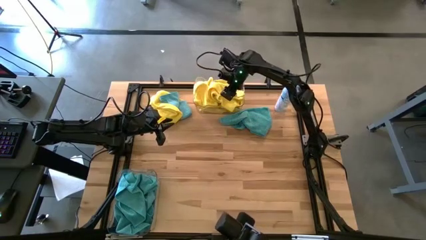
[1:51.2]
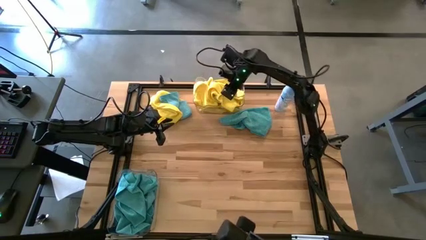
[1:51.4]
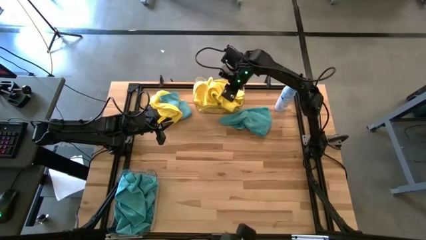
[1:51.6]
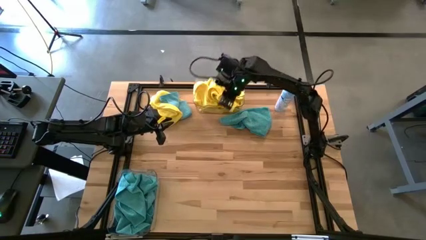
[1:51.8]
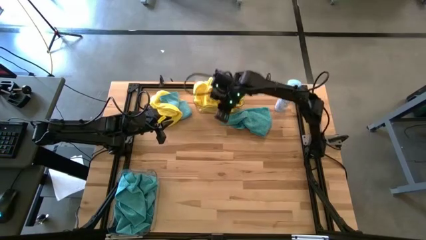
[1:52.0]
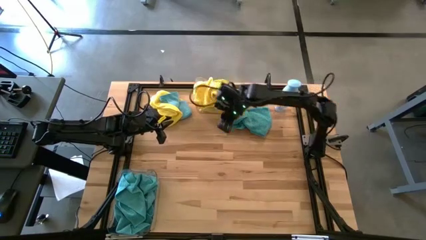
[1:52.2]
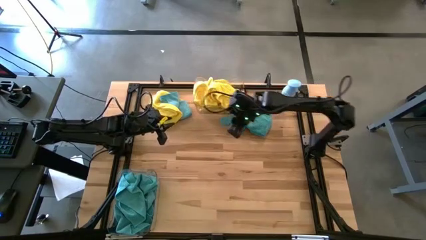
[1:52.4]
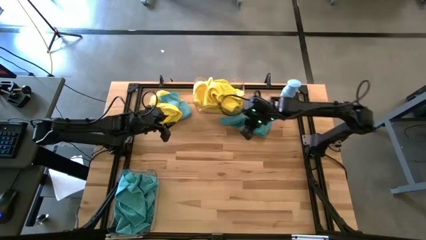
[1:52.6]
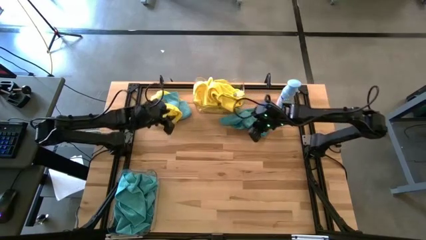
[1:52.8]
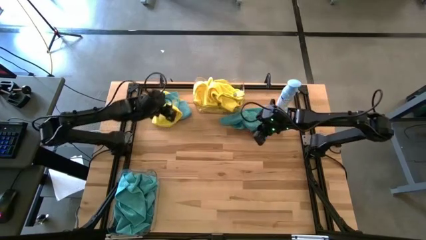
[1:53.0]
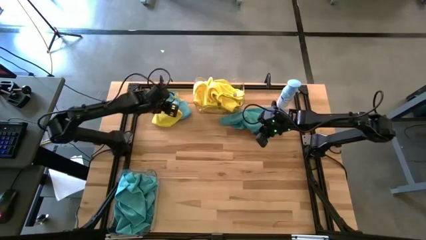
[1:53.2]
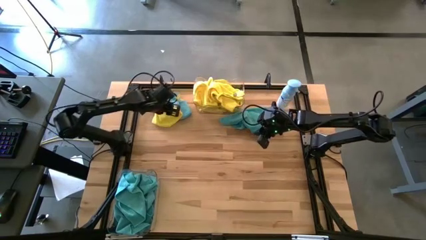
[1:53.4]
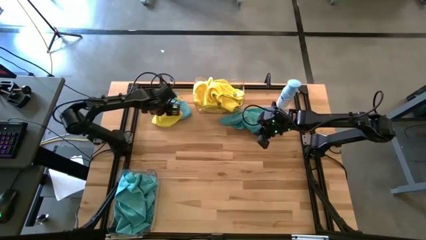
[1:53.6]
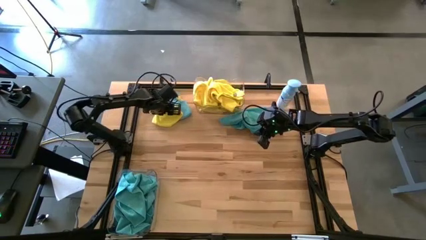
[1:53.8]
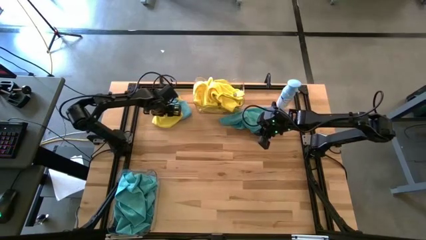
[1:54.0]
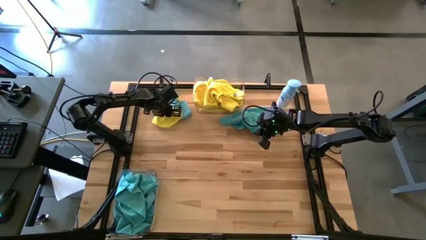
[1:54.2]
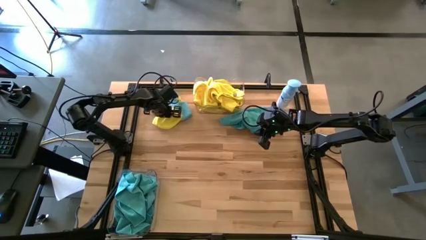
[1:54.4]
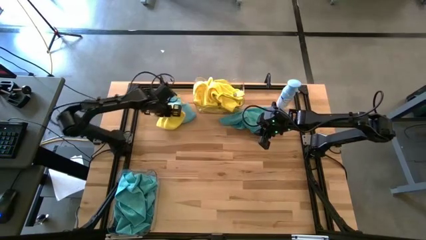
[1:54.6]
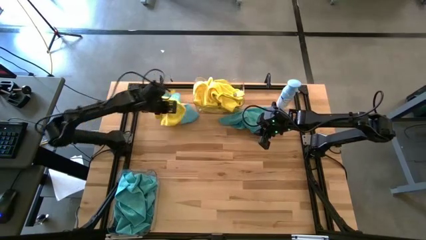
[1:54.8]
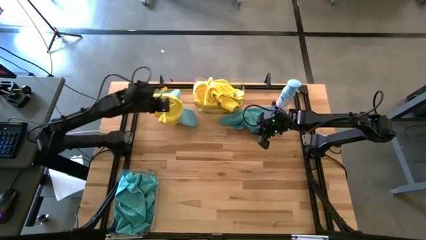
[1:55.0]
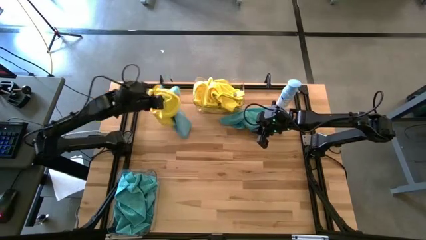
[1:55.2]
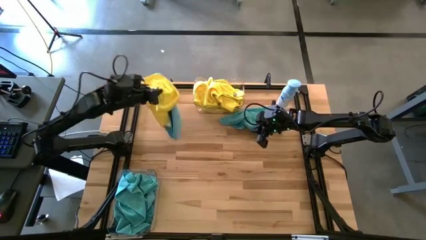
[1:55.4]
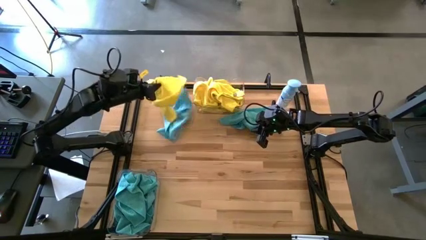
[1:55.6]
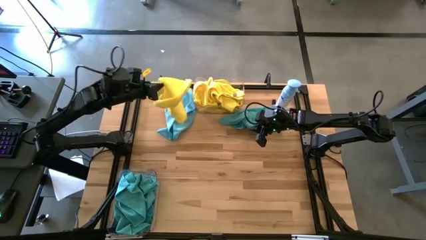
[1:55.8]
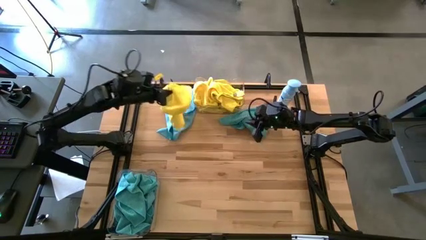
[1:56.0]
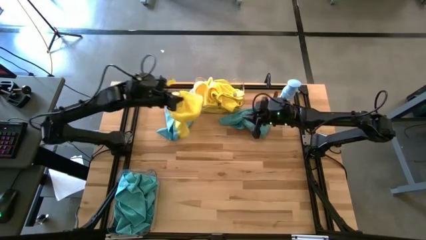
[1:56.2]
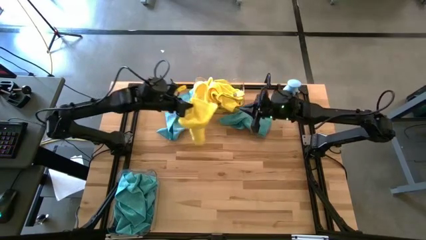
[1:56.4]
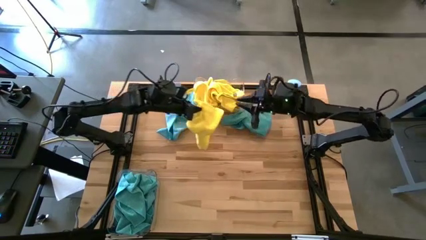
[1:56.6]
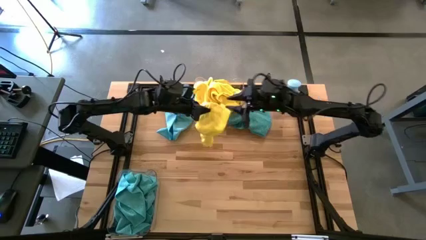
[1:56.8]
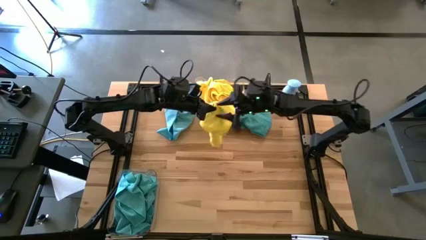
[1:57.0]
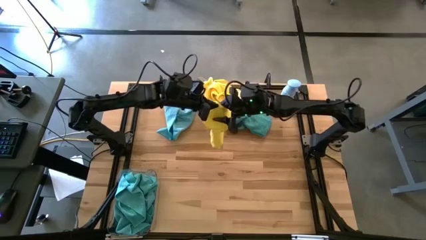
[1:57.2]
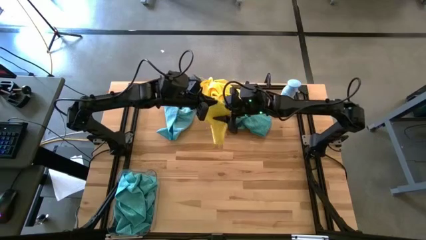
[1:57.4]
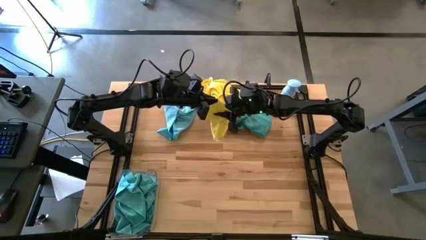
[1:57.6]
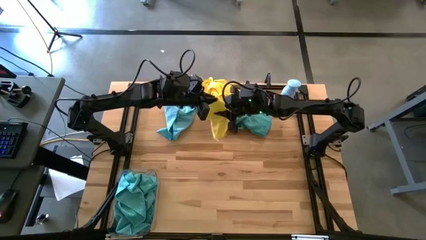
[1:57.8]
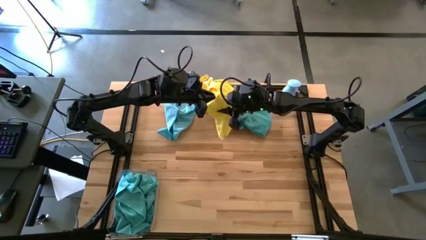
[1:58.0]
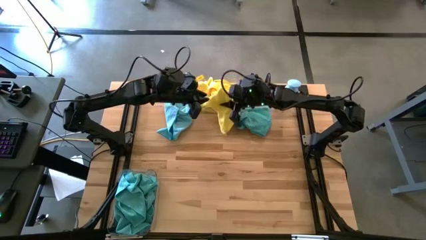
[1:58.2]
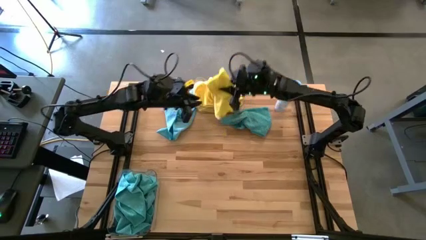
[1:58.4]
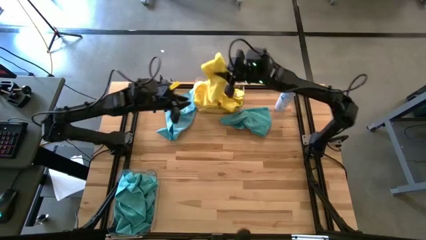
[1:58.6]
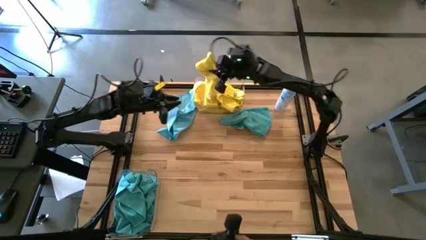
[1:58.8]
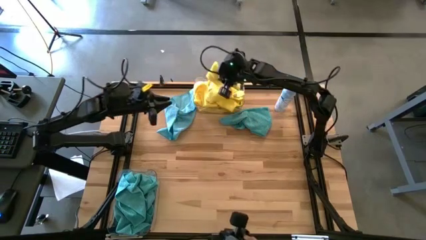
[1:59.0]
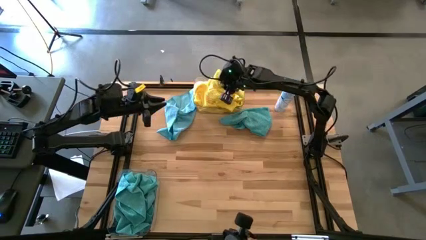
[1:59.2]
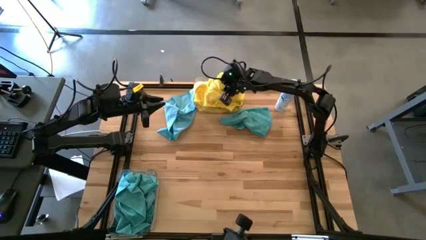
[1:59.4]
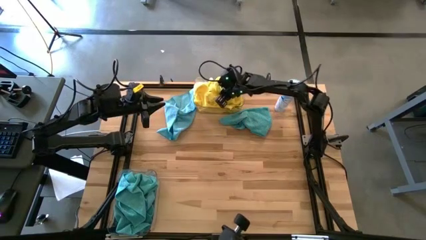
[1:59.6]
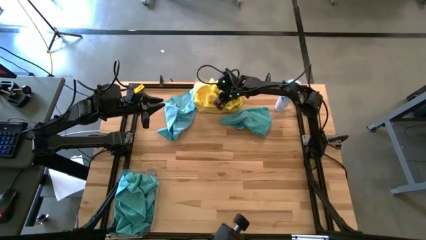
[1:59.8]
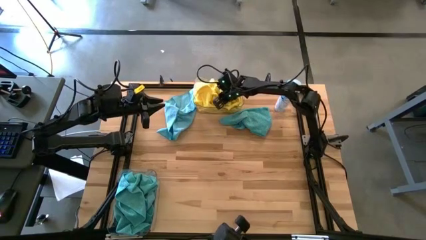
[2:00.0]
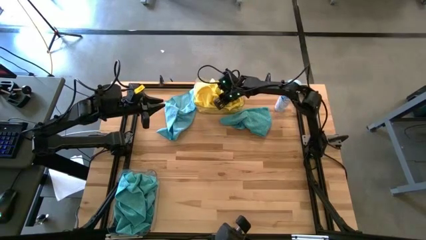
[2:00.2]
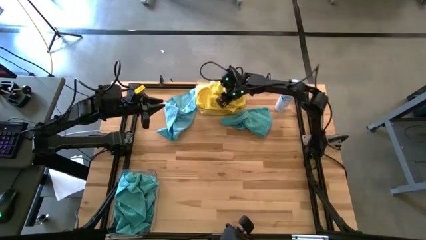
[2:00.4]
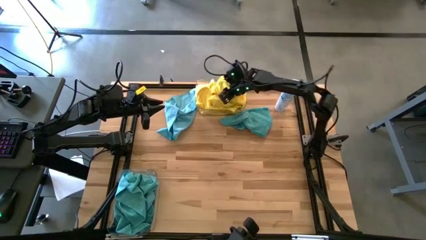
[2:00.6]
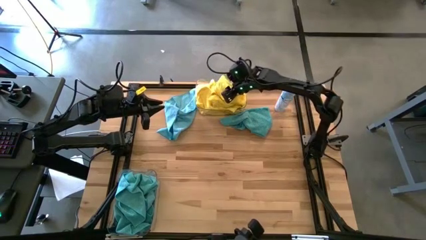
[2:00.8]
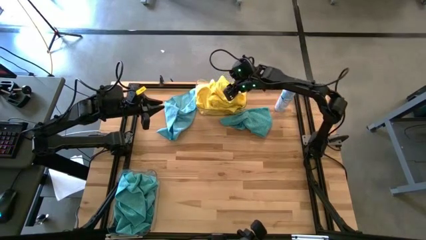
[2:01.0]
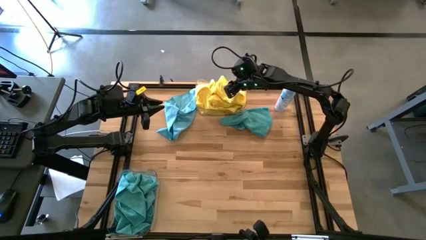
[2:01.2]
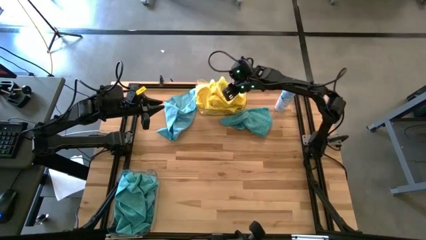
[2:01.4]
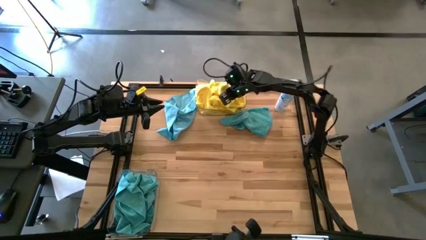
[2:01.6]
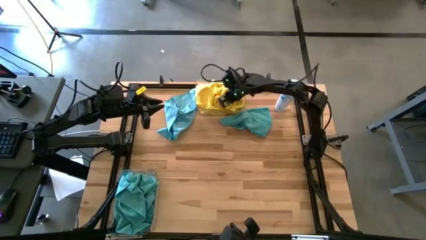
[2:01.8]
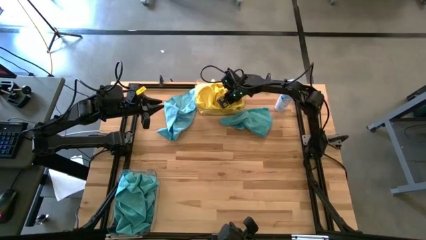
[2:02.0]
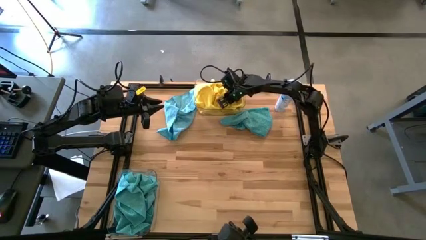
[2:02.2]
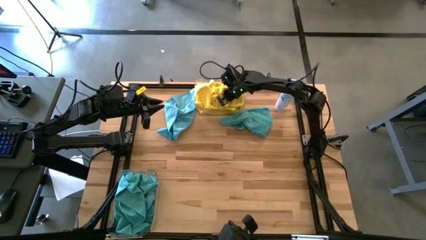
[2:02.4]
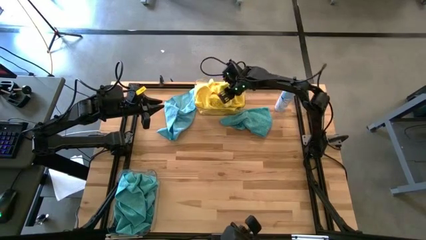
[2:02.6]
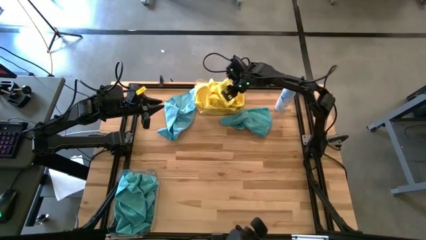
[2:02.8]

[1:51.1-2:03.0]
Task: Sort microfiber towel by color & place in baskets
Put the yellow microfiber towel into the top transparent bin

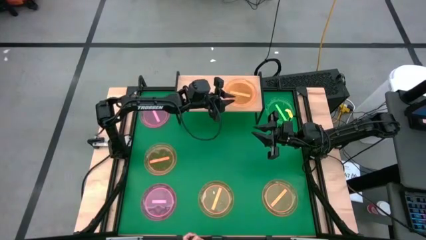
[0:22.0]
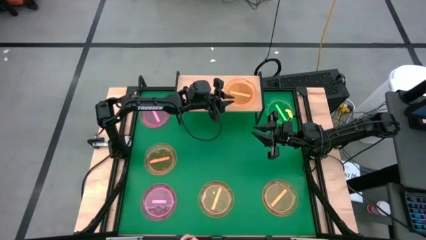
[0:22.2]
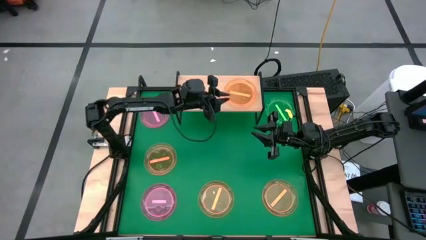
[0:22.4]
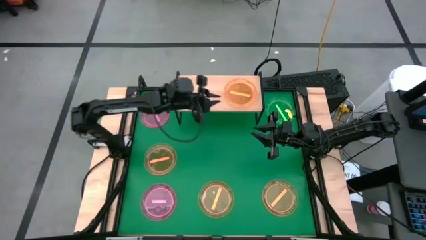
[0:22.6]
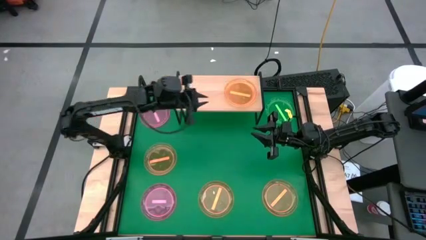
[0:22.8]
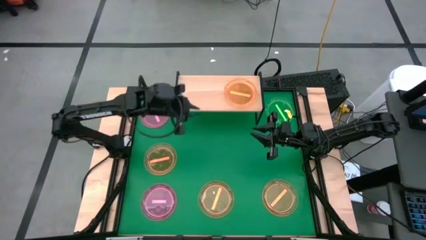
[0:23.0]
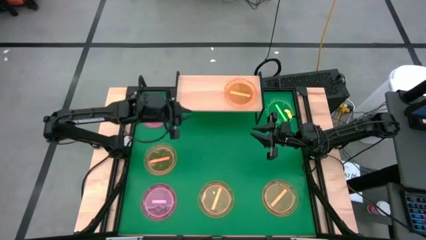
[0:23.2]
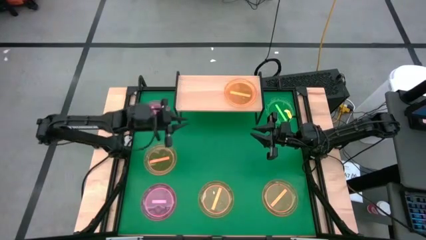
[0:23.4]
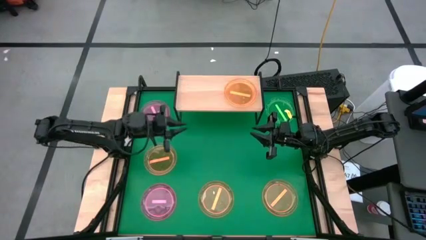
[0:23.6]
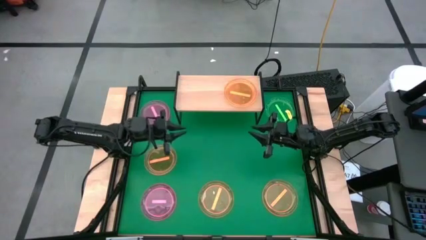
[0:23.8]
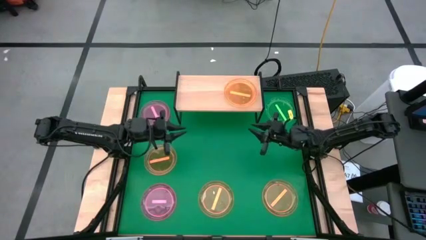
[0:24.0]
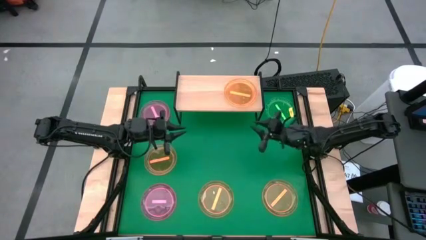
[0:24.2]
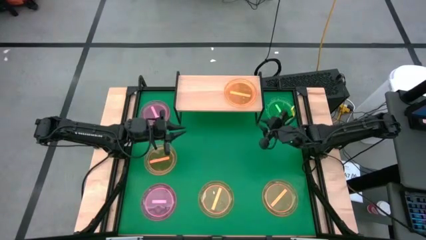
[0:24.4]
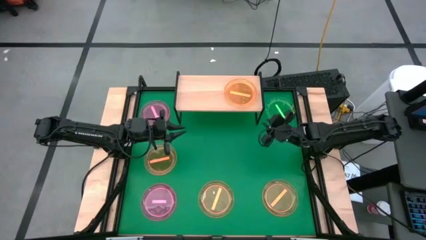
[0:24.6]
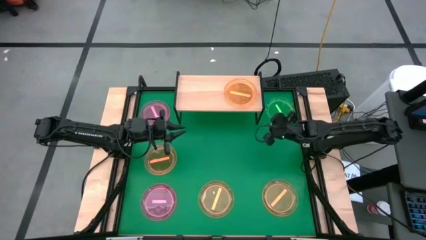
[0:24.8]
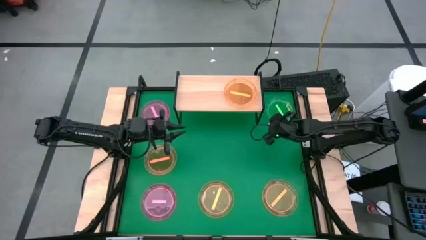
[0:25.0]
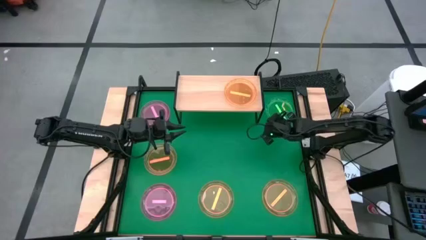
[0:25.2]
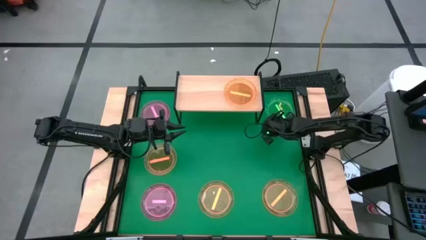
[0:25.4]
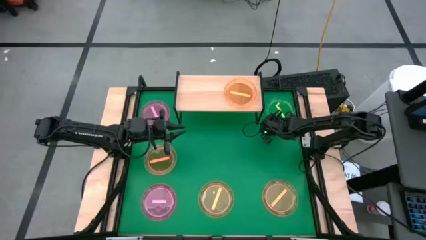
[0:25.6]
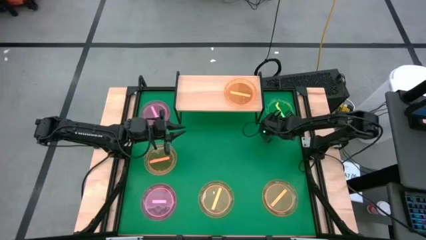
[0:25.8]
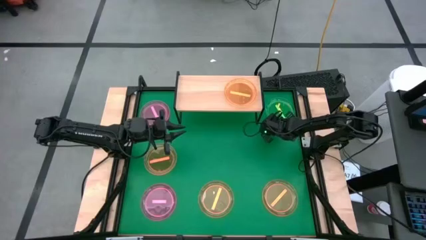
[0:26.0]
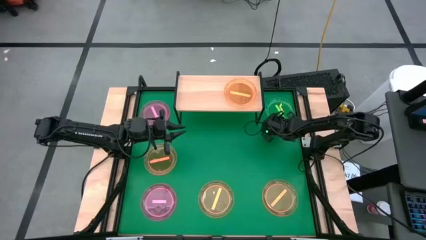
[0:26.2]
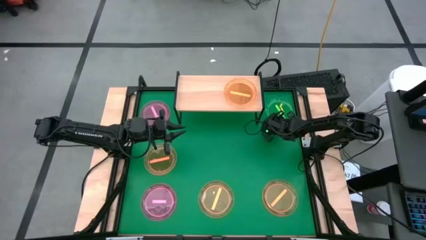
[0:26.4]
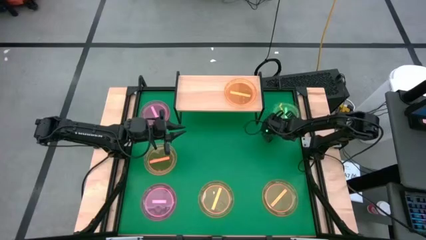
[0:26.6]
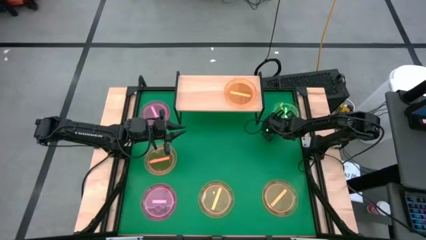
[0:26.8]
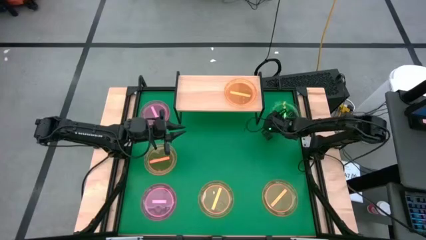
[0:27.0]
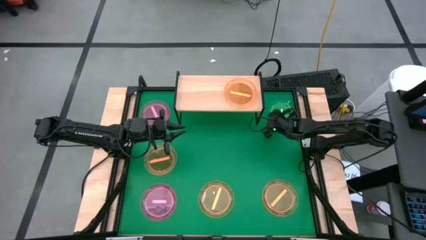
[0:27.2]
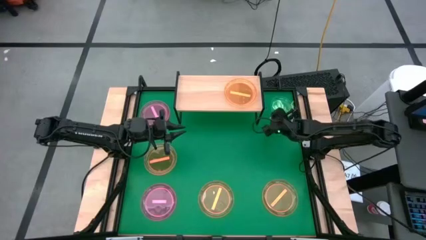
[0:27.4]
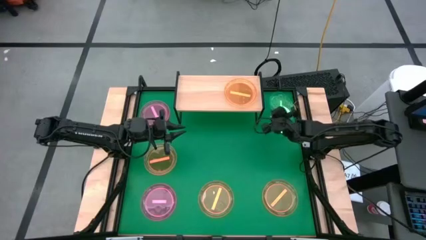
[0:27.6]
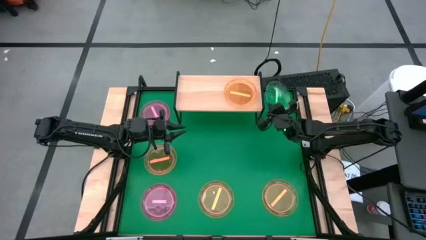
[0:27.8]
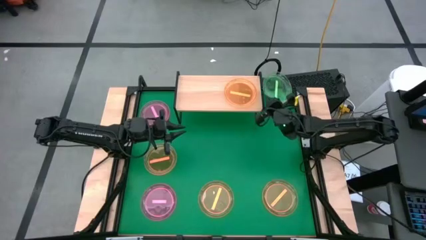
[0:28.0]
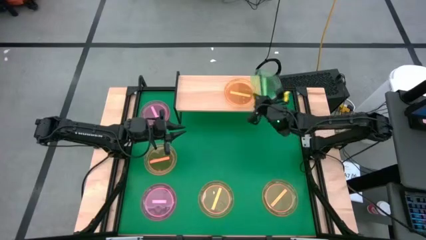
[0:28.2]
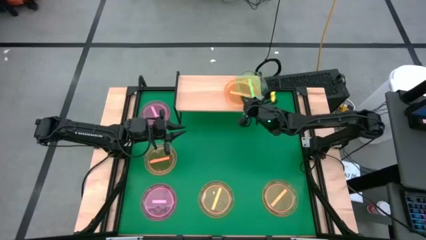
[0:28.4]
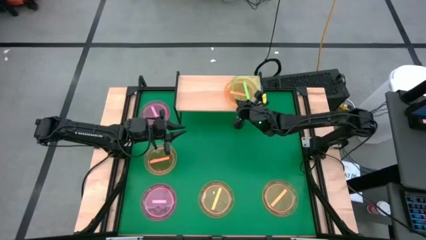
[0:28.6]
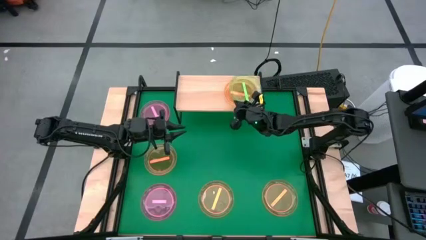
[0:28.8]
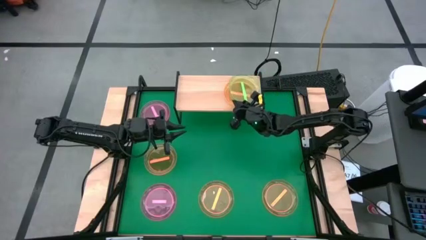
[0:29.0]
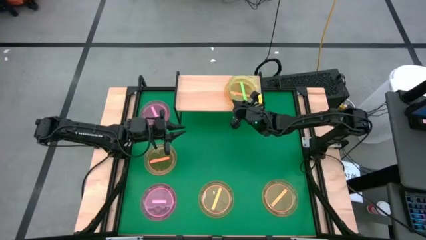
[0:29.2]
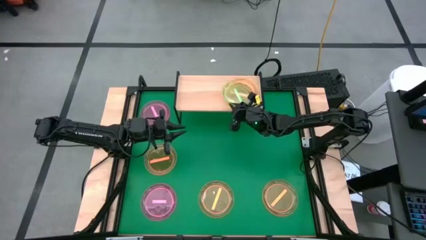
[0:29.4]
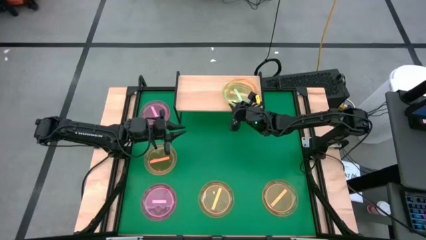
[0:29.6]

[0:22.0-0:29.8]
Task: Place and stack plates onto a shelf
Stack the green plate on top of the orange plate on the shelf
